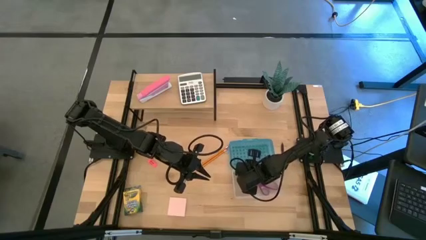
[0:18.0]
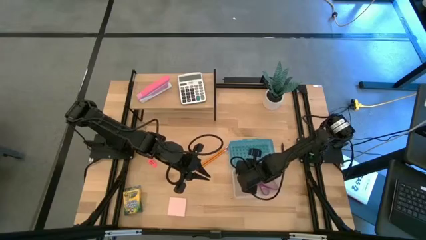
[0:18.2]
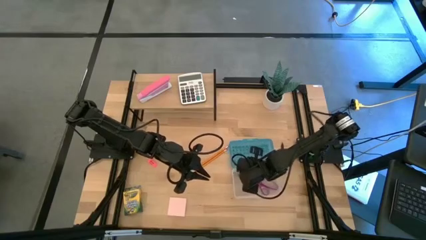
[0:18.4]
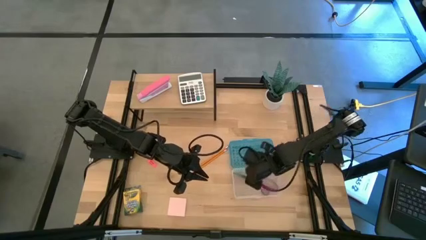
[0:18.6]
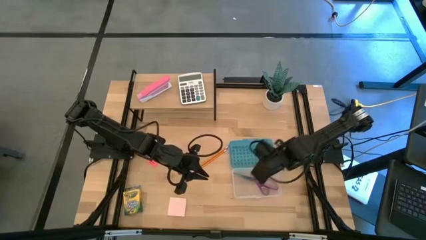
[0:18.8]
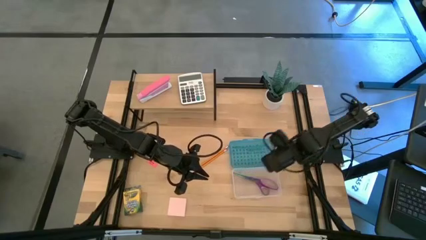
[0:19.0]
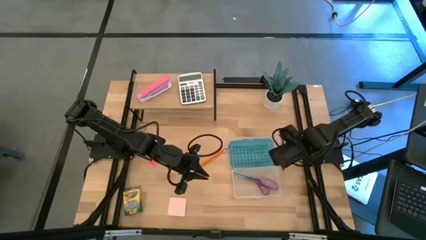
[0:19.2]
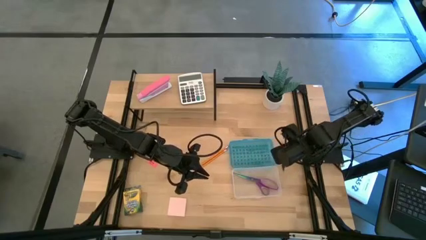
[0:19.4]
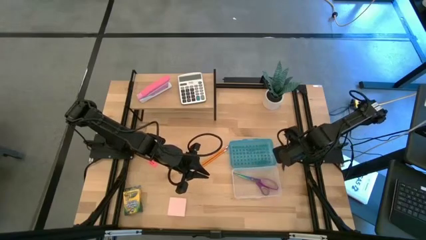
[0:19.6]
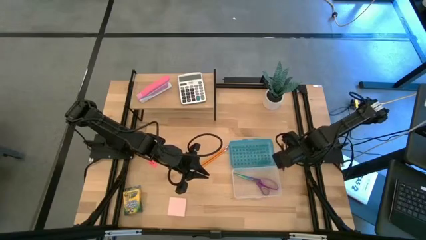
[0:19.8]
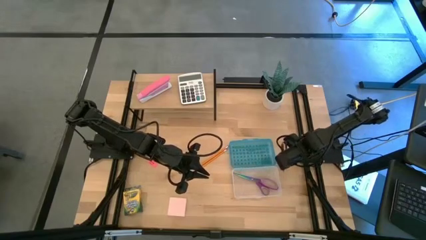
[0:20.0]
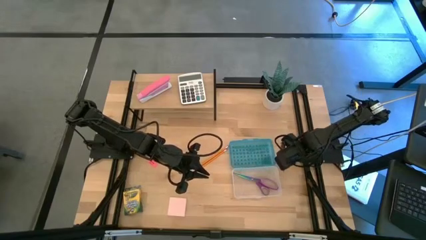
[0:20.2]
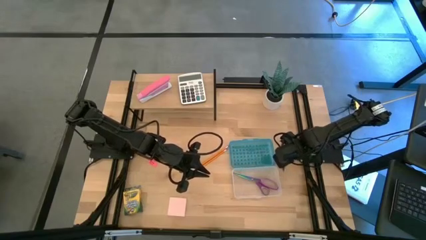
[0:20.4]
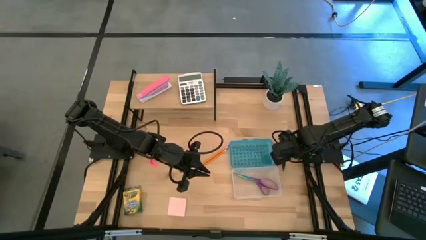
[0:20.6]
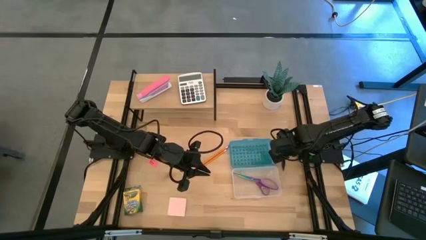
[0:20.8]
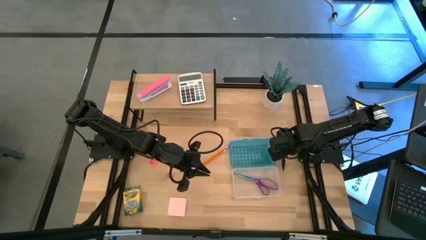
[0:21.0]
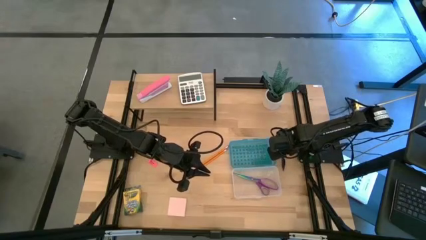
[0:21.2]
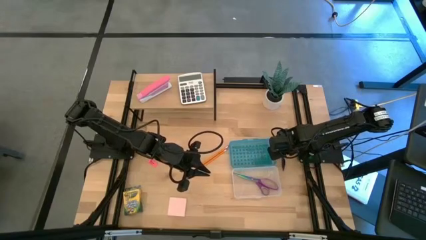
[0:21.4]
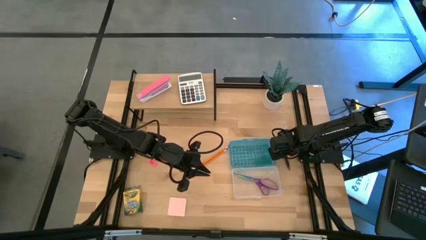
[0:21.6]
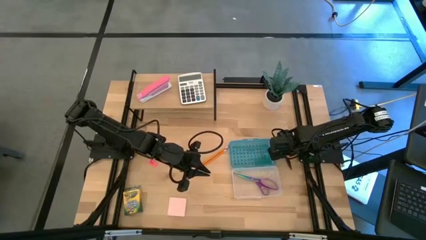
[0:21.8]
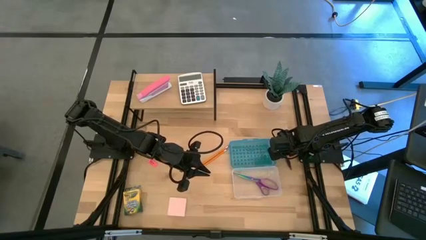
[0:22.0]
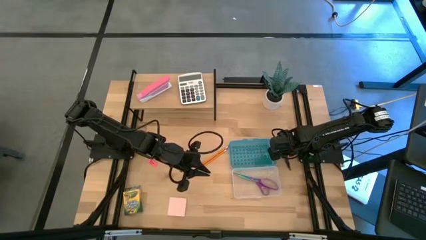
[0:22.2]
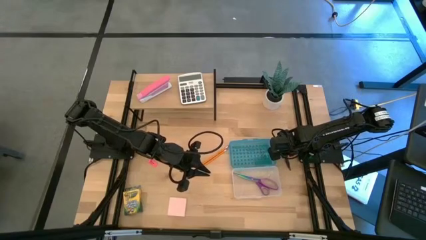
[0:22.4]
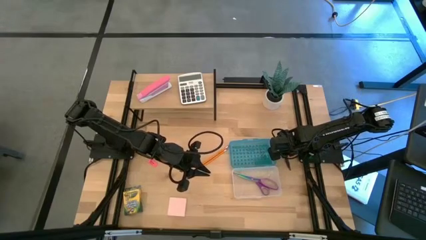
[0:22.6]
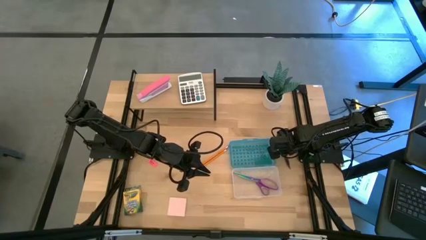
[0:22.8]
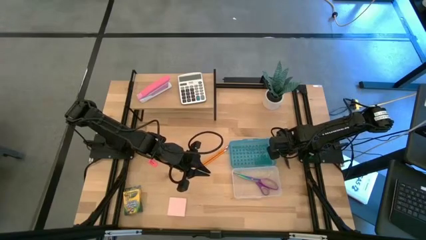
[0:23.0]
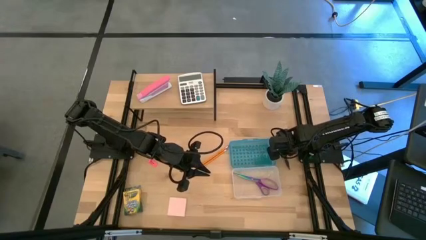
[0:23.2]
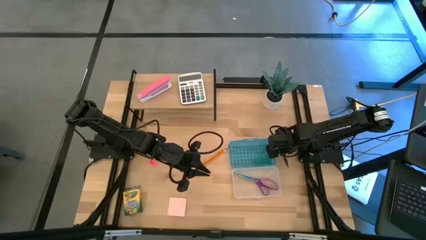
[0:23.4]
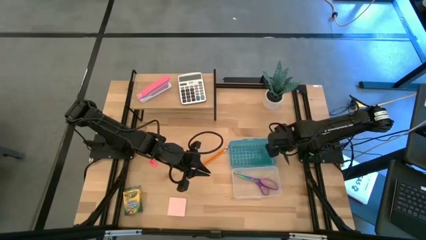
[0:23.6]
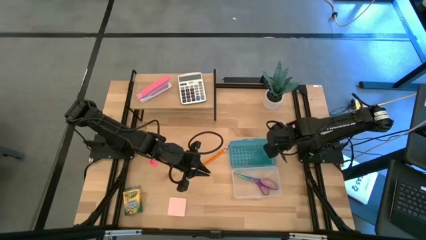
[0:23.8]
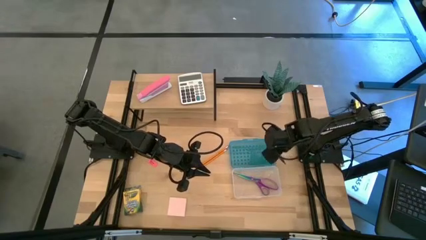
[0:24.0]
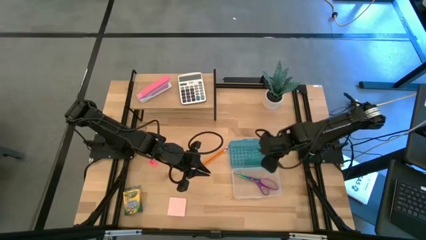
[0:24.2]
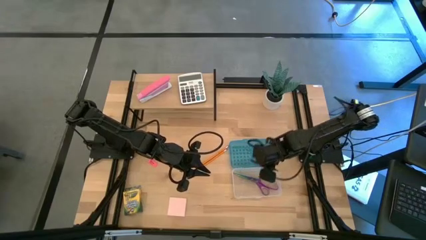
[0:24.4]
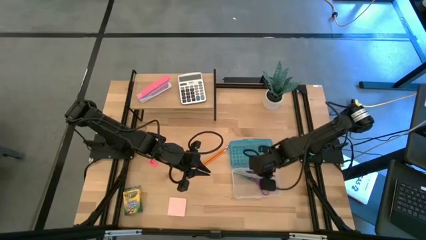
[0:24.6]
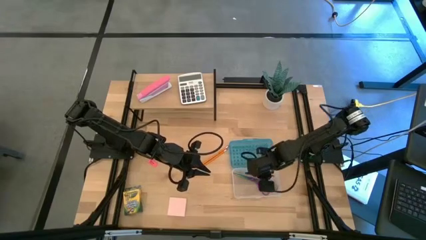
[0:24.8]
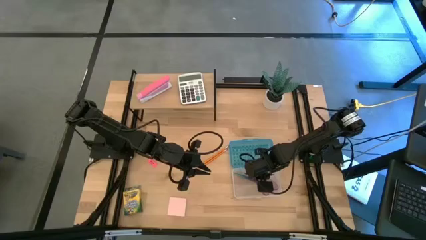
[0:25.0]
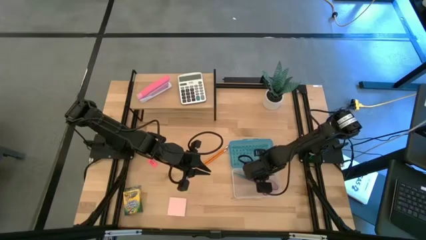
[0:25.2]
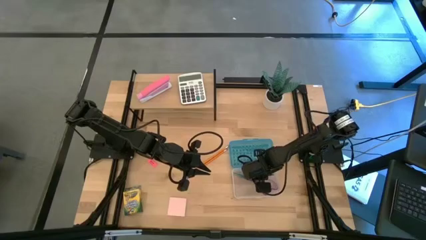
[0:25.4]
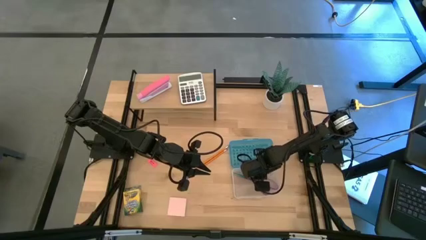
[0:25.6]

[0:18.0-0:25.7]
Task: Pack school essentials
Put the violet pen into the blue supply box

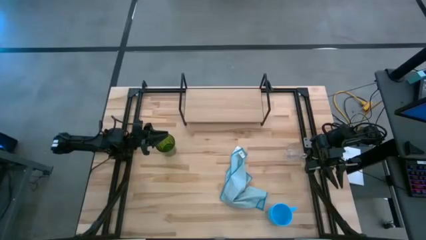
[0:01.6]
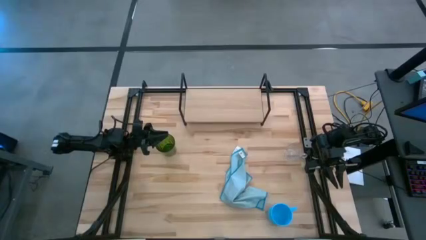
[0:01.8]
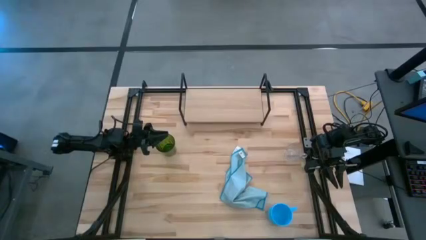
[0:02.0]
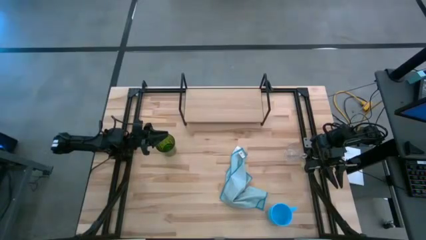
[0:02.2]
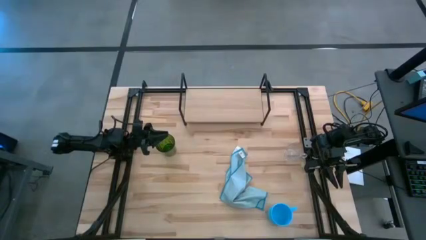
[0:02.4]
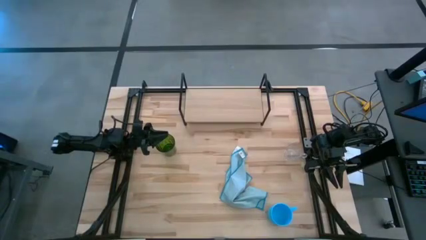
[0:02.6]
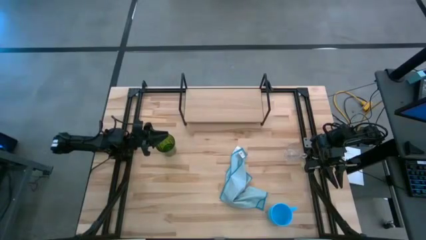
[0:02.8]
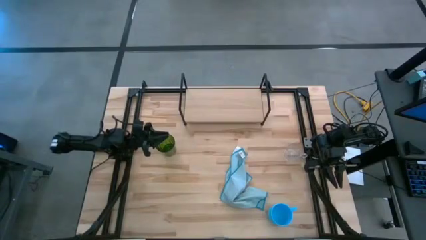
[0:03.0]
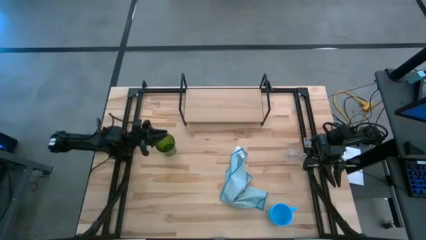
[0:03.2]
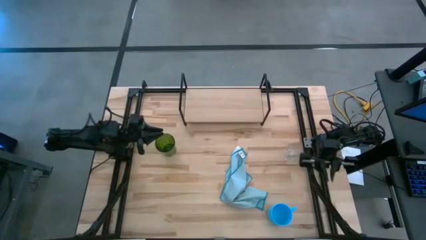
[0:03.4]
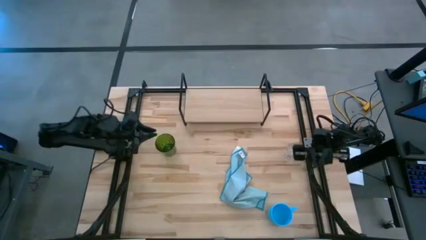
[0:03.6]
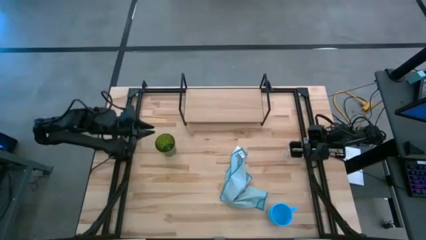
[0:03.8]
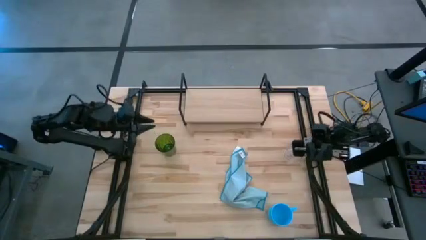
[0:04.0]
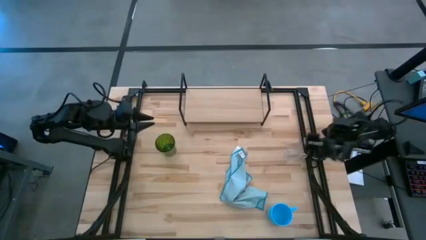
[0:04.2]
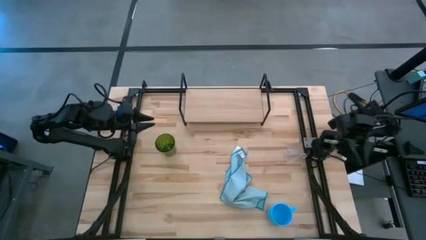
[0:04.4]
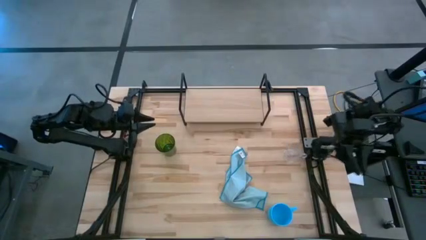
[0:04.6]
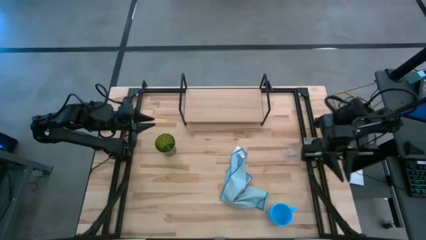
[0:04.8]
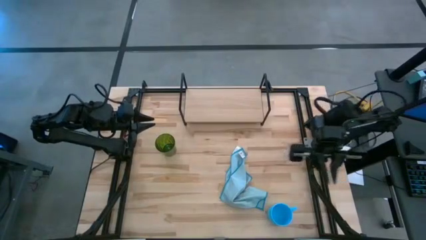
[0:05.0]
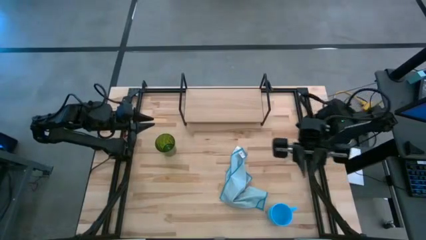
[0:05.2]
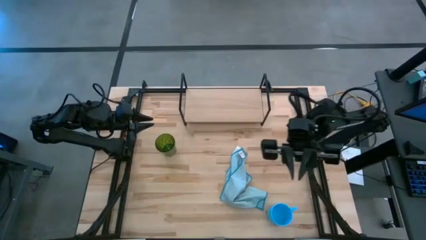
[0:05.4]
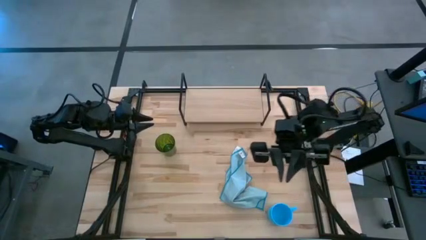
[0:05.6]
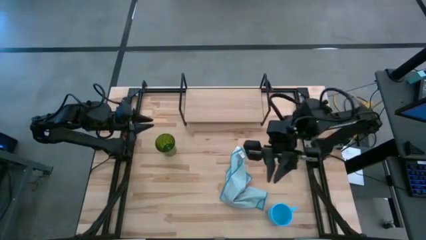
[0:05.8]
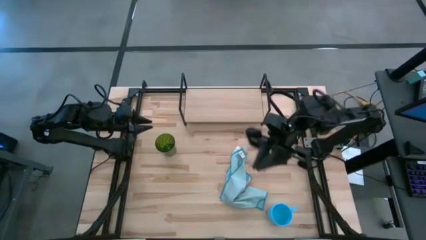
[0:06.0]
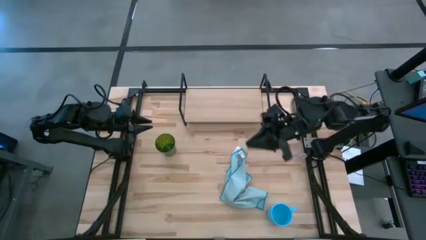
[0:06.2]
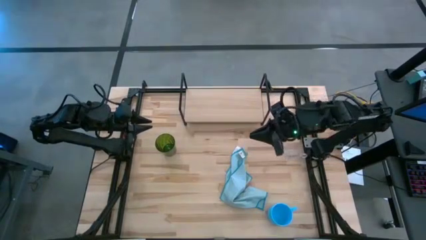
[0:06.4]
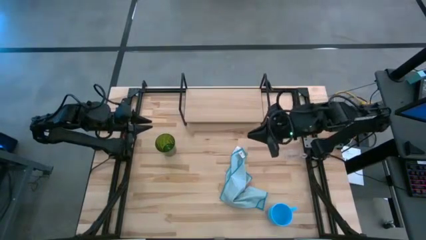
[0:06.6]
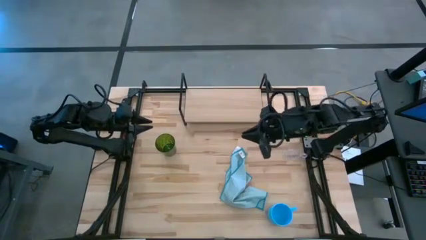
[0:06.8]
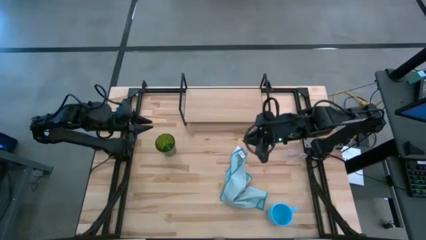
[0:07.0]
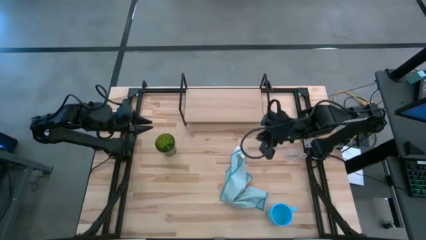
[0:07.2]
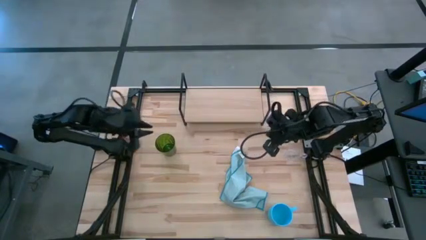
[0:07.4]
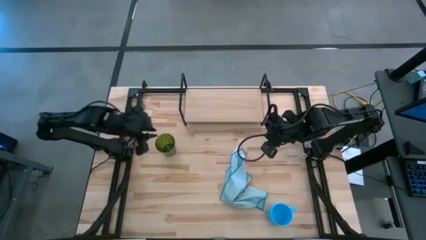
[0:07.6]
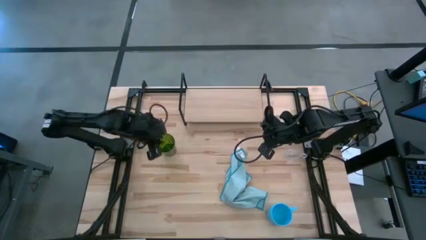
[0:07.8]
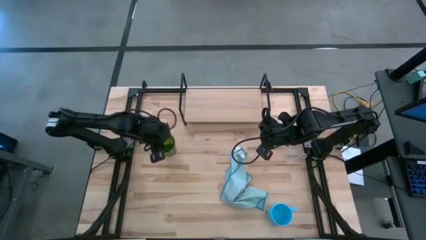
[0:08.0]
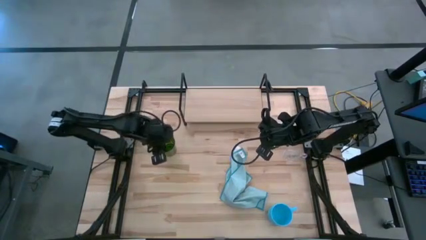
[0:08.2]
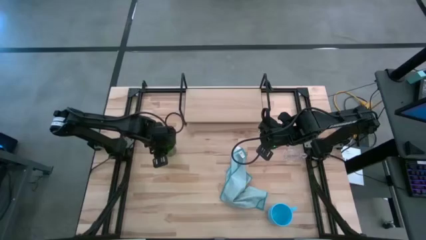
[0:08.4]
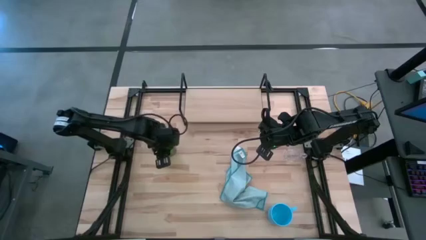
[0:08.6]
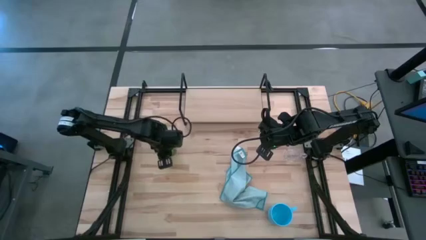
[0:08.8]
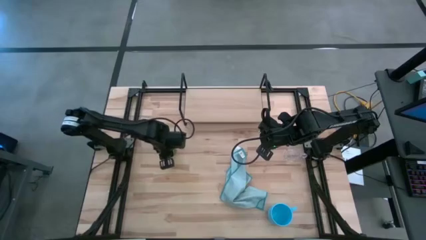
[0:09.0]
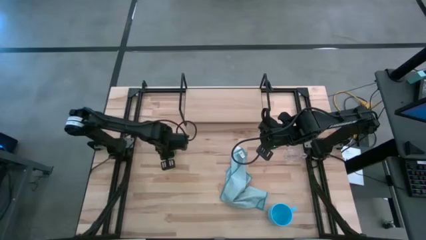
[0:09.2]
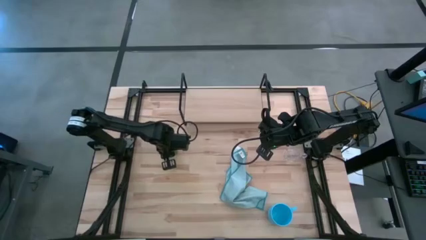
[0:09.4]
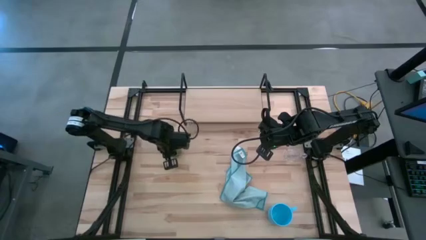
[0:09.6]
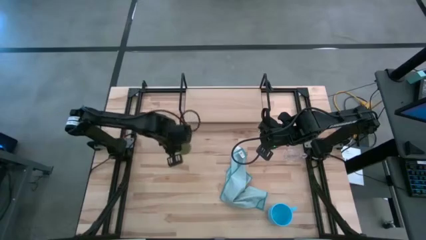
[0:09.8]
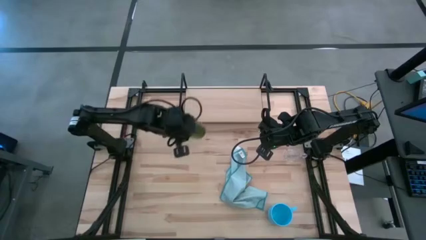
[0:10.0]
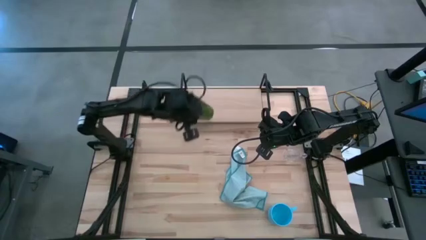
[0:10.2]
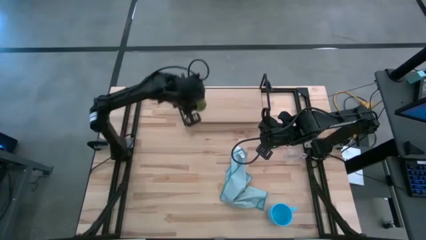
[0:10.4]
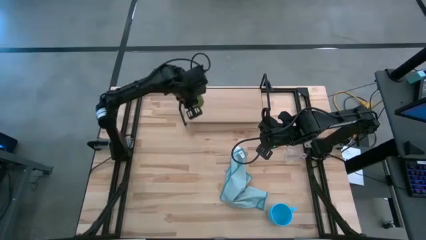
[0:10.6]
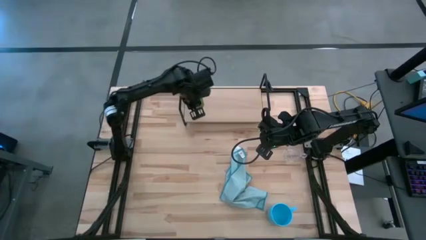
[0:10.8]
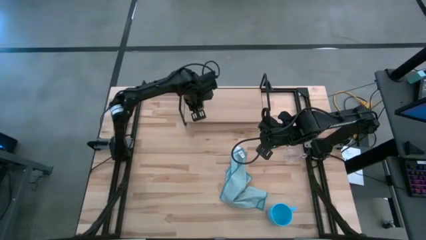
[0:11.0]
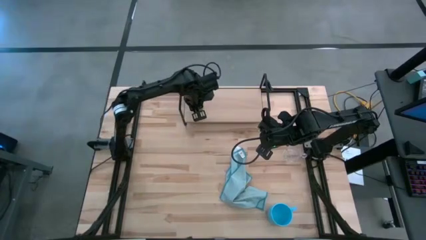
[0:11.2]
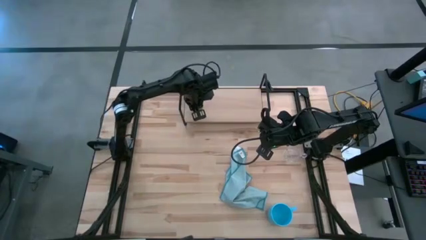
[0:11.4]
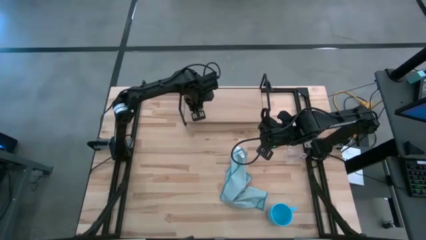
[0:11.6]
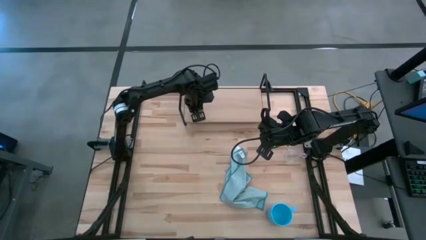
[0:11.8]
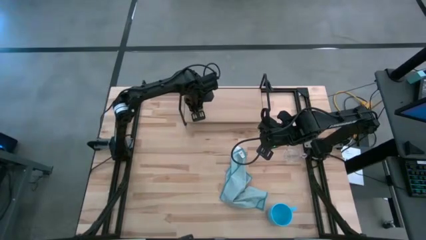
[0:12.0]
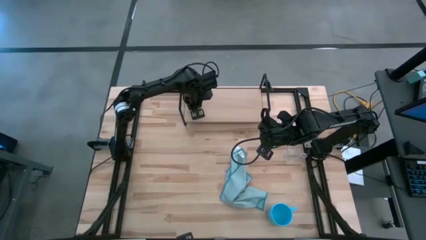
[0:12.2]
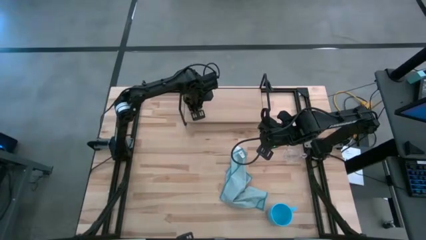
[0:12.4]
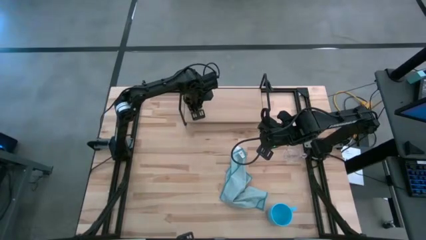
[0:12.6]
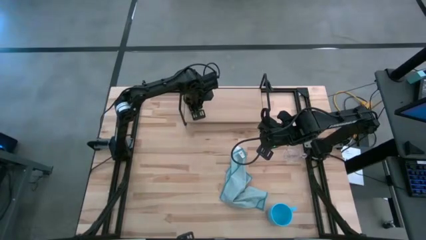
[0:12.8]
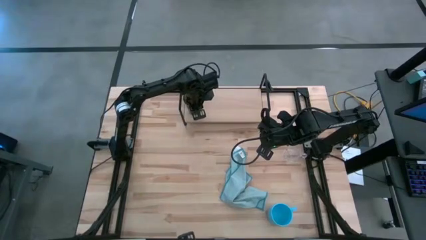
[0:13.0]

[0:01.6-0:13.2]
Task: Stack small to large cups/mugs on shelf
Put the green cup on the shelf
